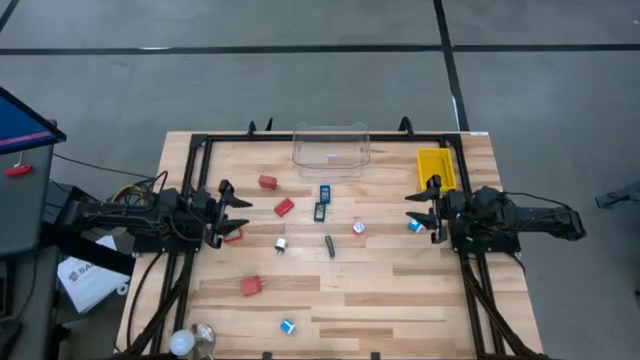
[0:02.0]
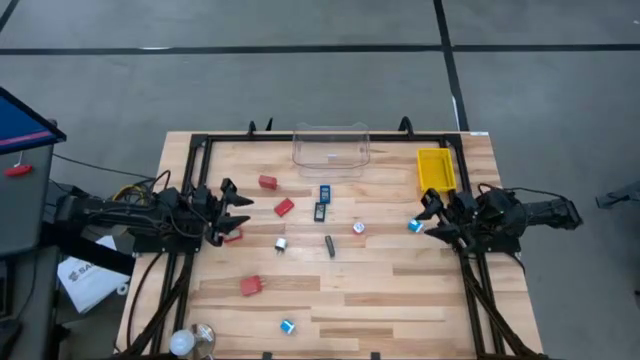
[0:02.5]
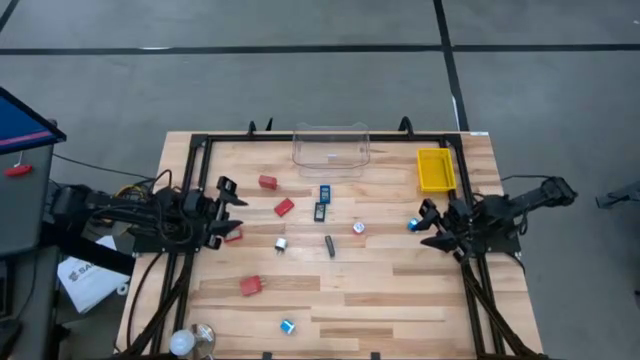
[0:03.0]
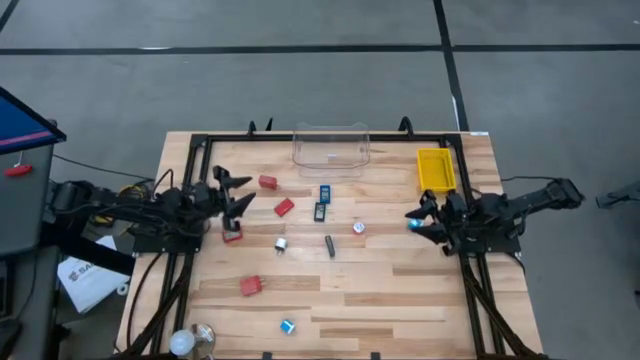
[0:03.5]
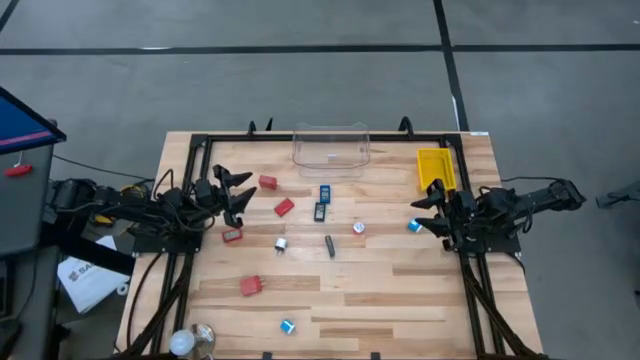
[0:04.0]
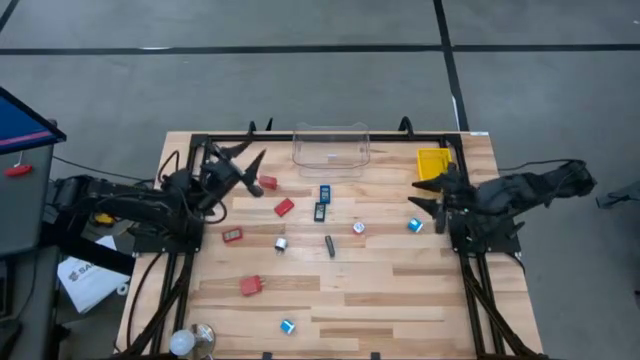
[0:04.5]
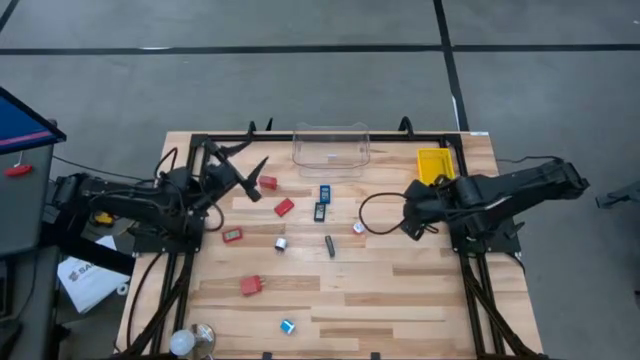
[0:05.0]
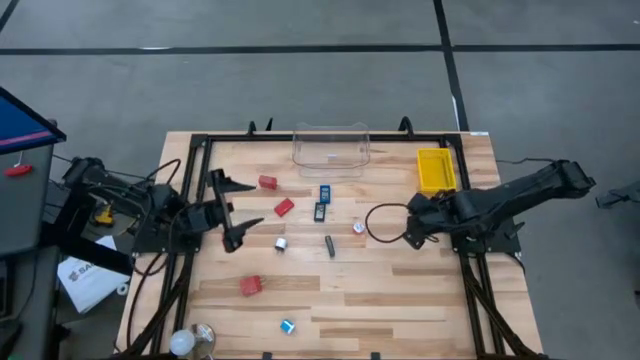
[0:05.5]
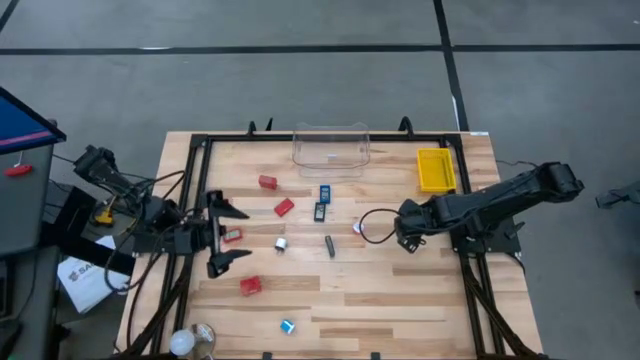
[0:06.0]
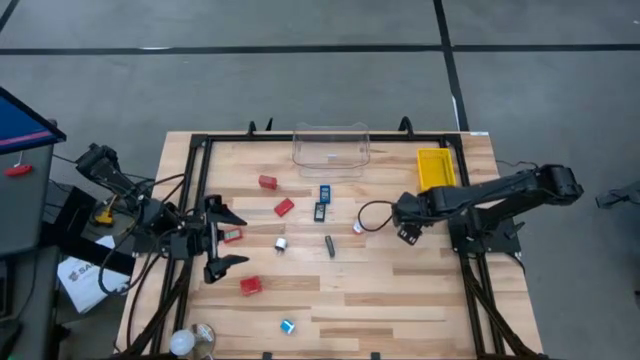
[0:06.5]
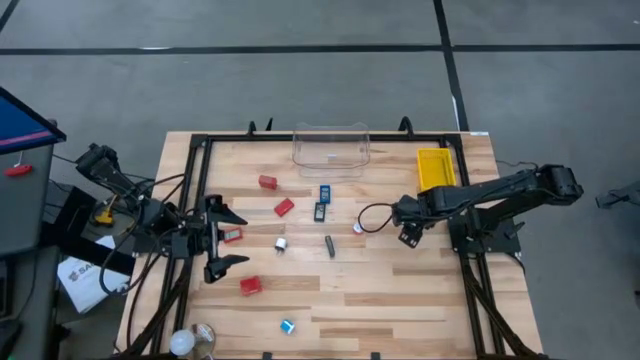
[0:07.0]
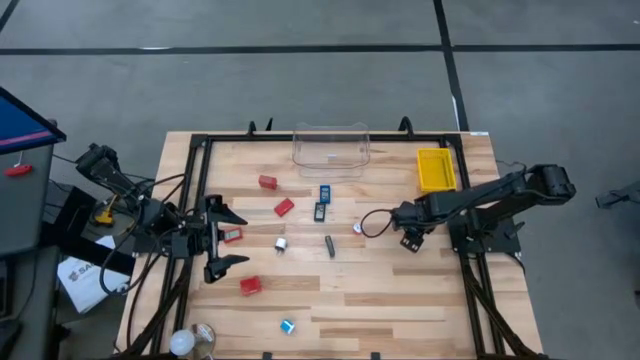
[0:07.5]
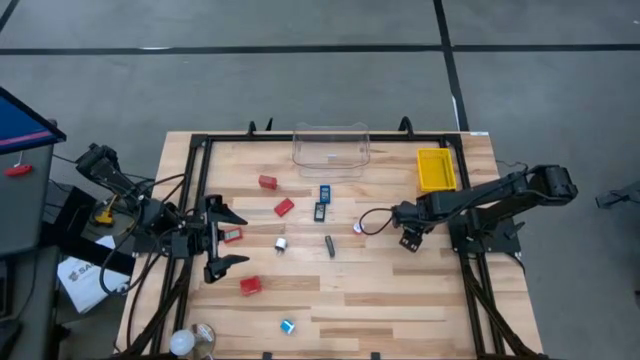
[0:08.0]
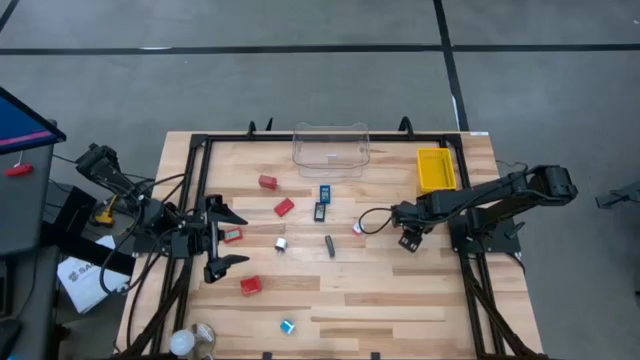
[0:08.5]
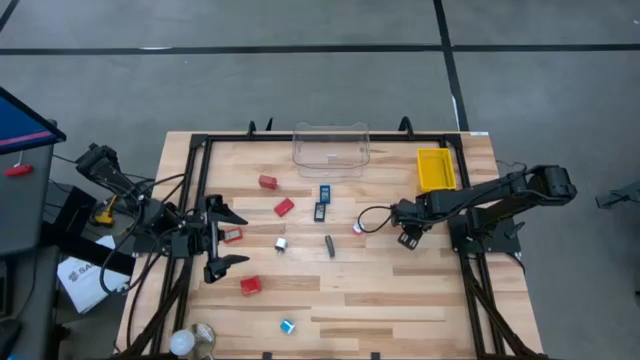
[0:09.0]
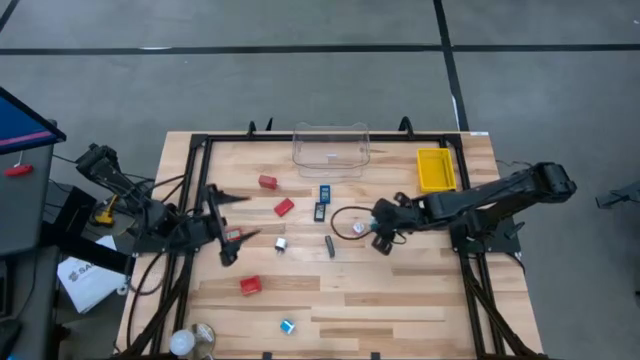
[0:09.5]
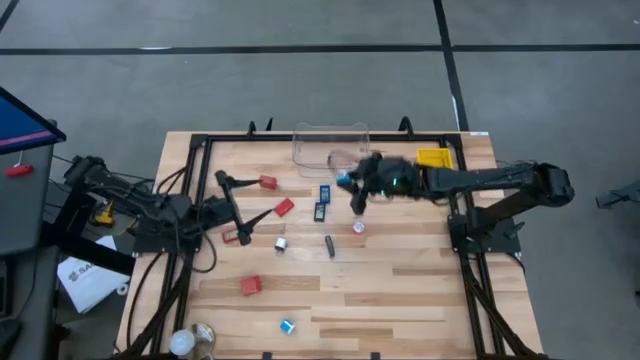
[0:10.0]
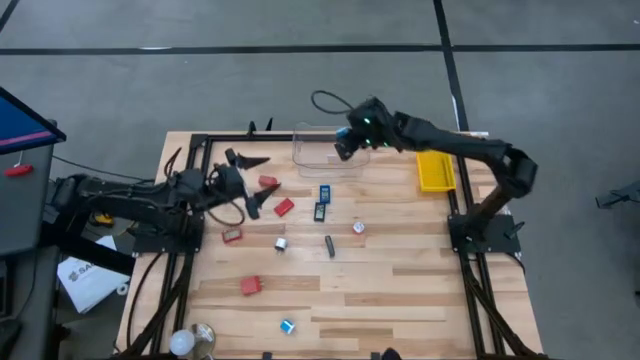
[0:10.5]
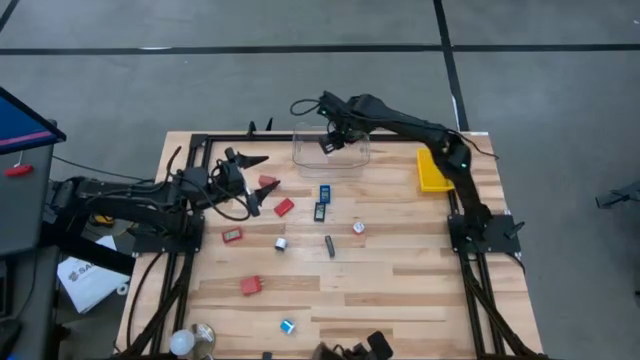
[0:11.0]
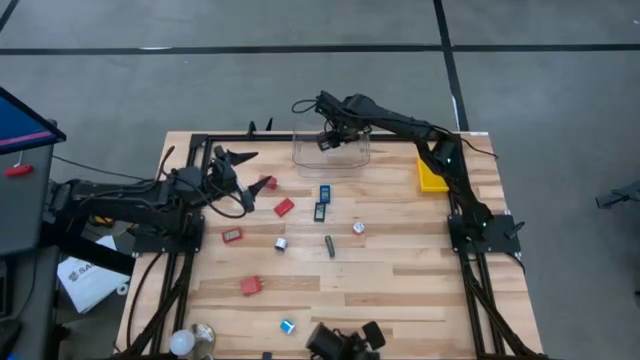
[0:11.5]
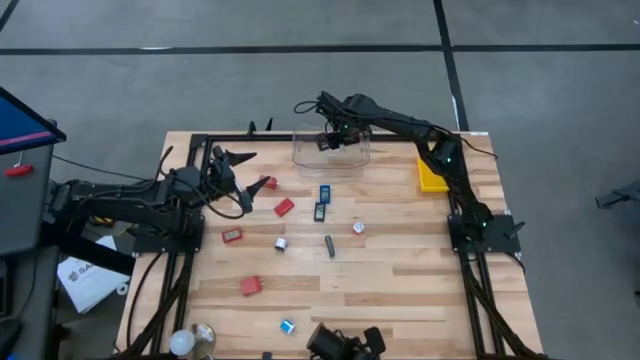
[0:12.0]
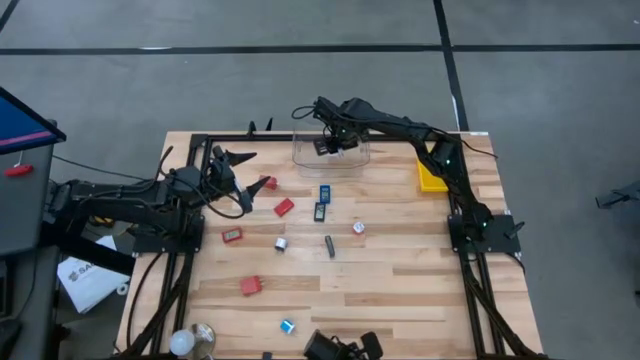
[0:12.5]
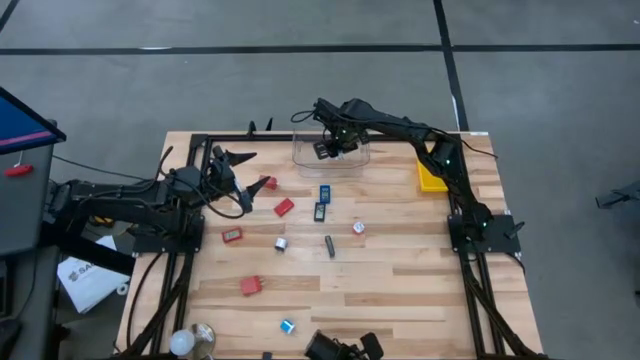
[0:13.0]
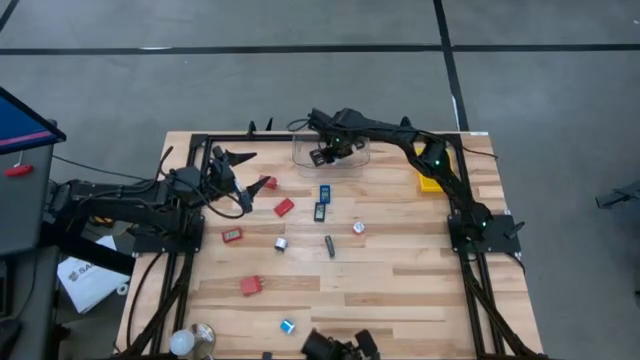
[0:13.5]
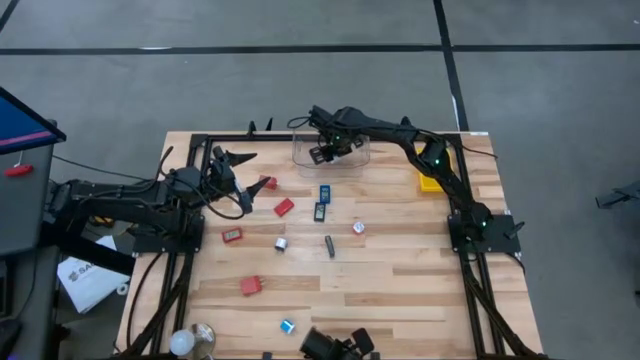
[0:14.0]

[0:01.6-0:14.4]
Task: Pick & Place Office items
Put the top blue charger adapter into the transparent bin

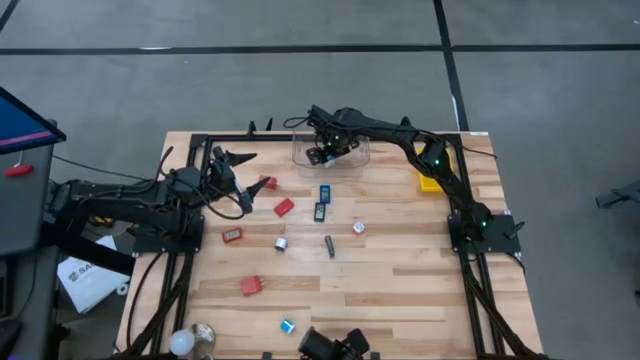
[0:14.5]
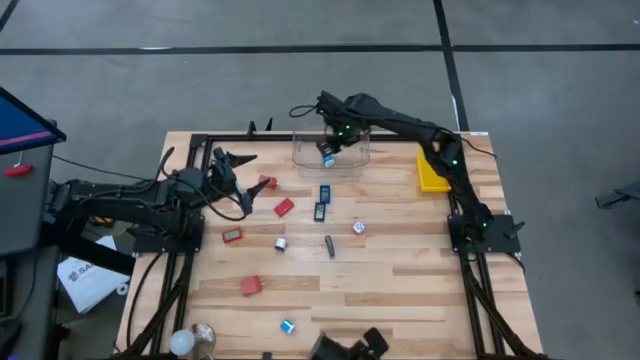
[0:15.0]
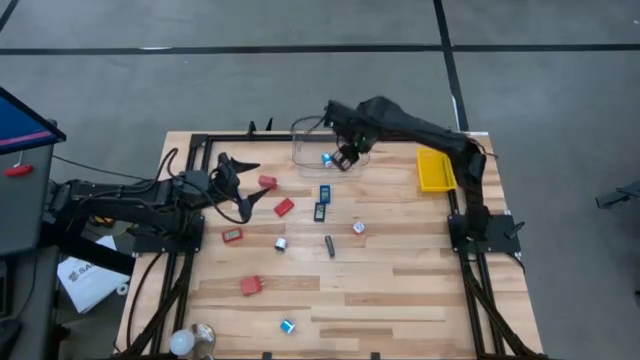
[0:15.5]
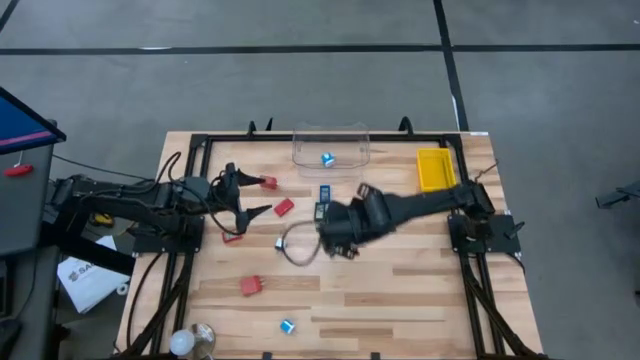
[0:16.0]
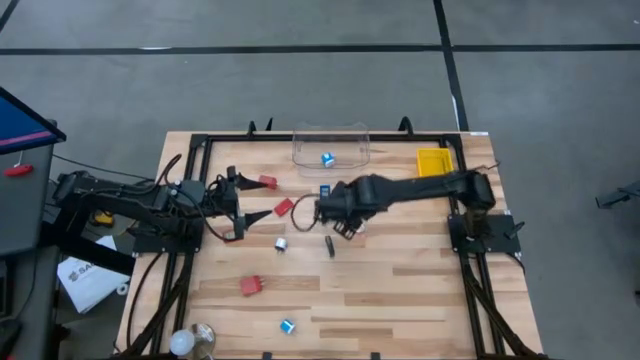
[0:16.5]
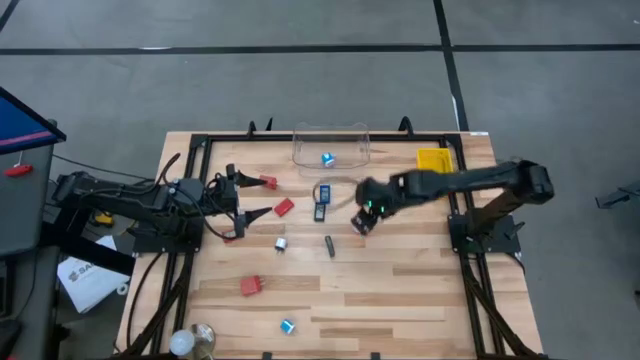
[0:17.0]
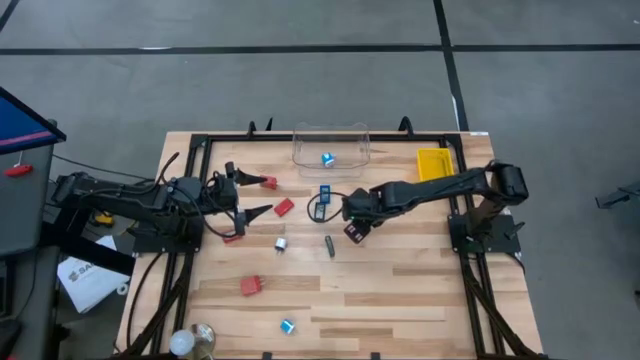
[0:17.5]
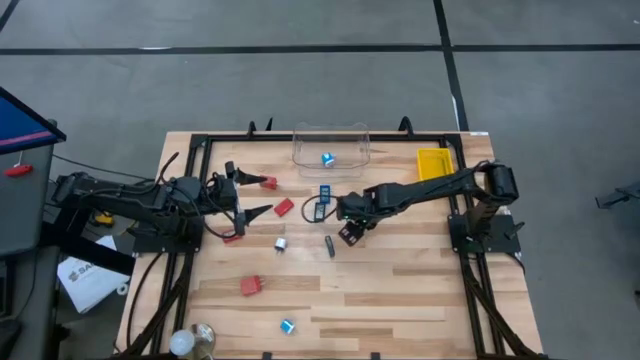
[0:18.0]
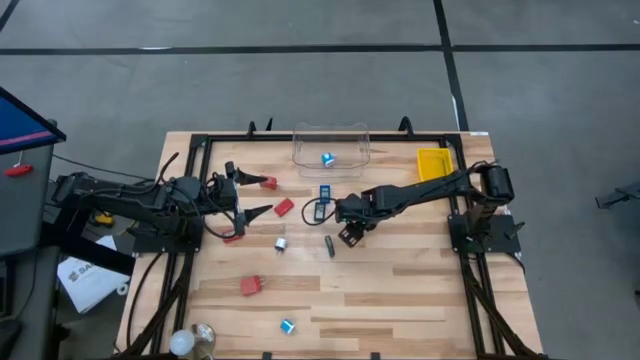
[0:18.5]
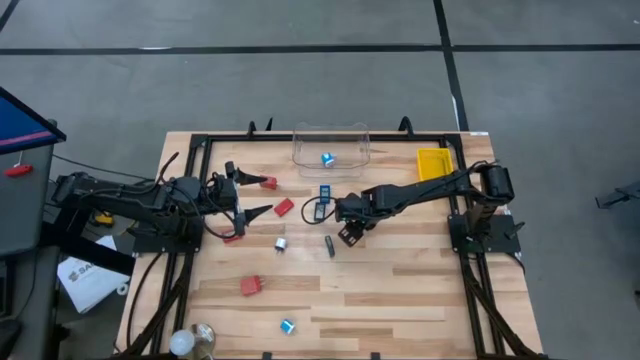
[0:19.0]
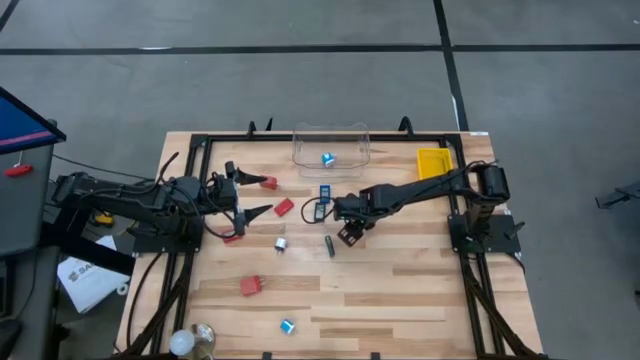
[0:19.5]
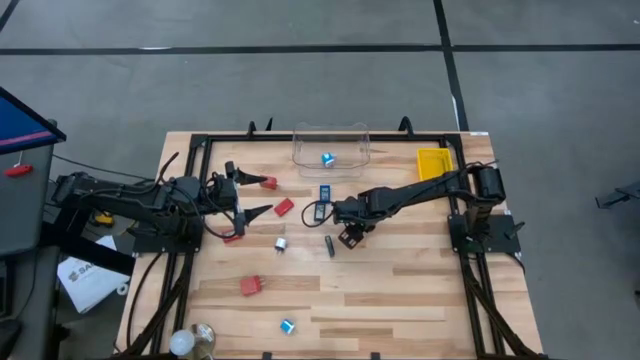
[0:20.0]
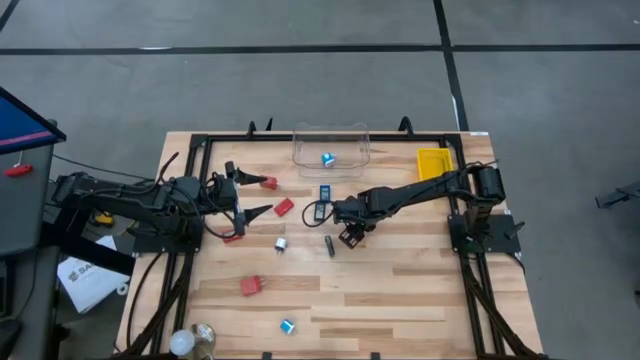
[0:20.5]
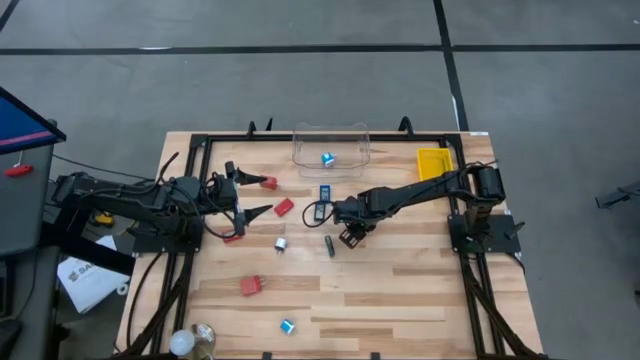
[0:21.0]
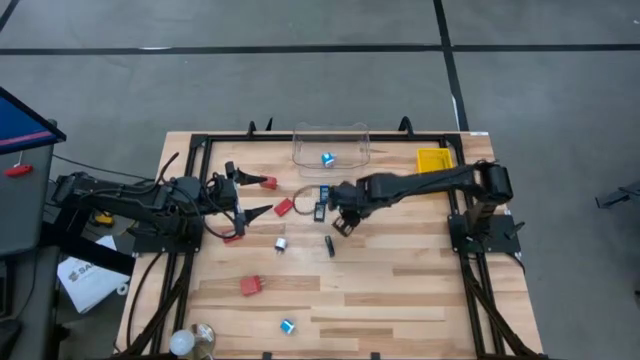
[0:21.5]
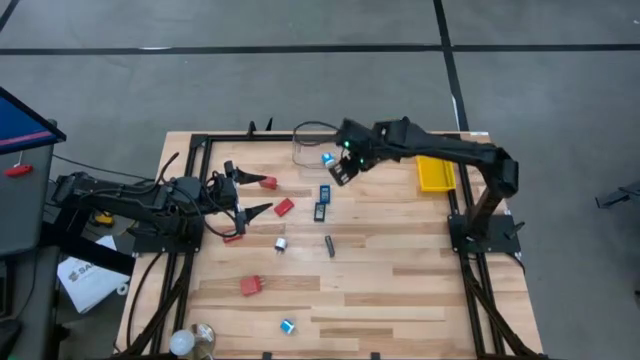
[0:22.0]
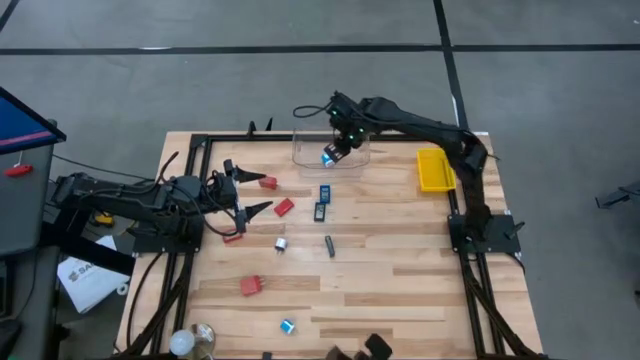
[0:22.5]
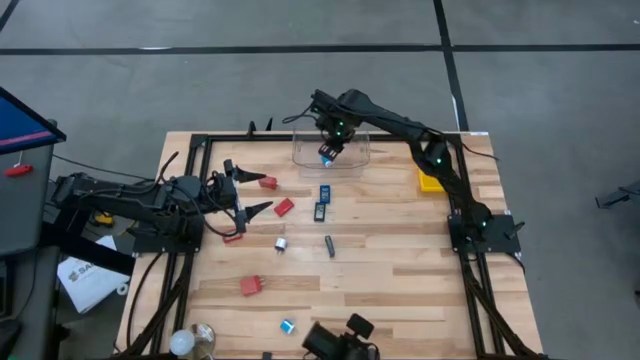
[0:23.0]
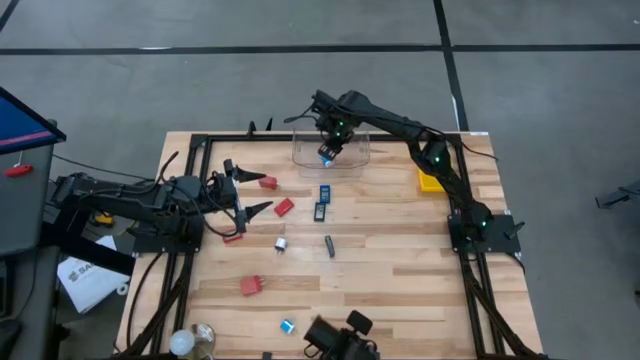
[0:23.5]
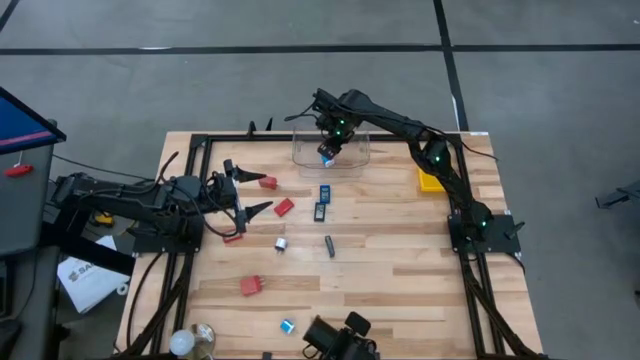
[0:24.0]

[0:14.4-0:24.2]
Put the pink charger adapter into the transparent bin
